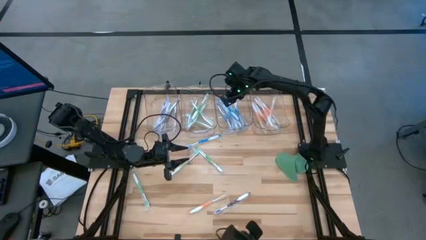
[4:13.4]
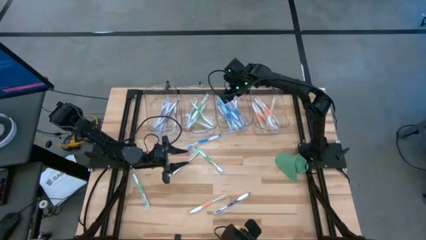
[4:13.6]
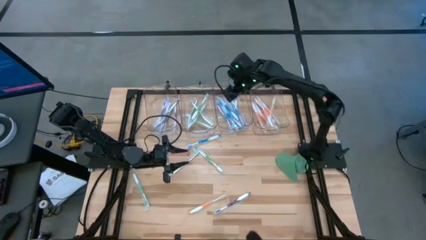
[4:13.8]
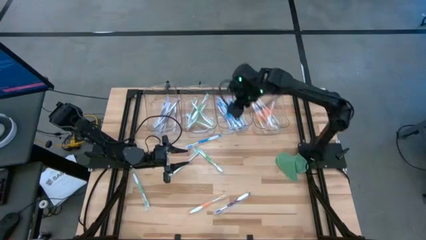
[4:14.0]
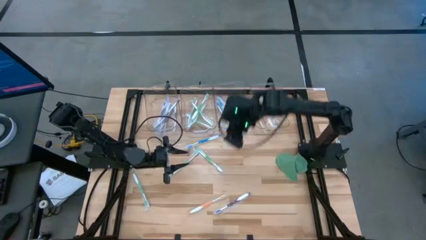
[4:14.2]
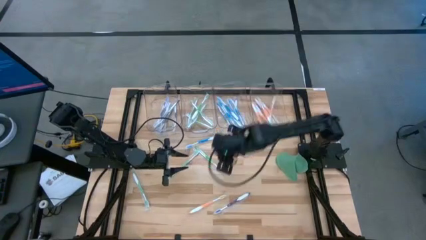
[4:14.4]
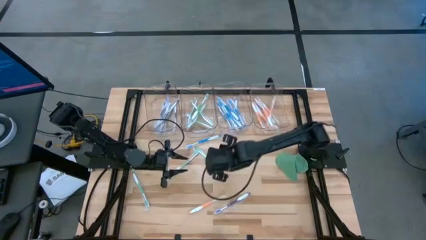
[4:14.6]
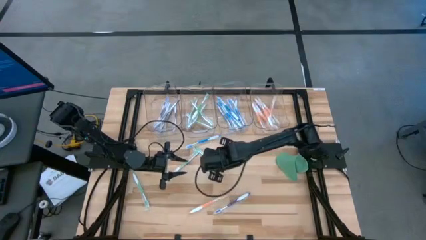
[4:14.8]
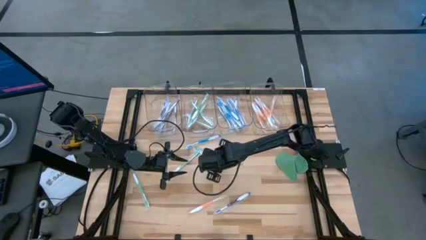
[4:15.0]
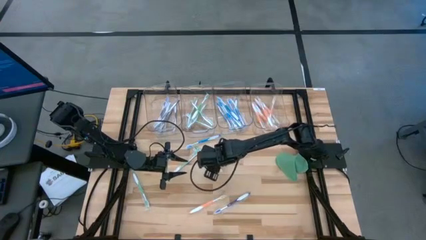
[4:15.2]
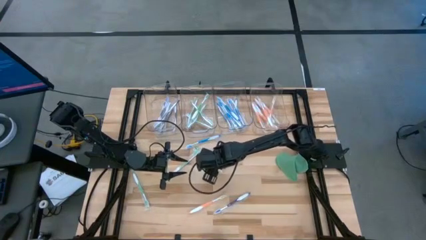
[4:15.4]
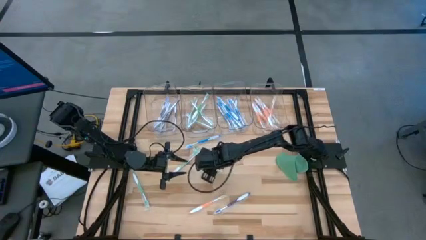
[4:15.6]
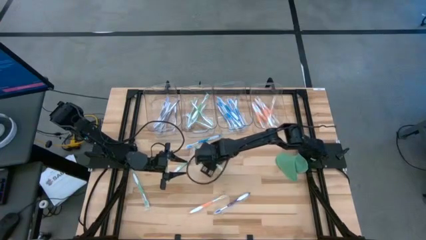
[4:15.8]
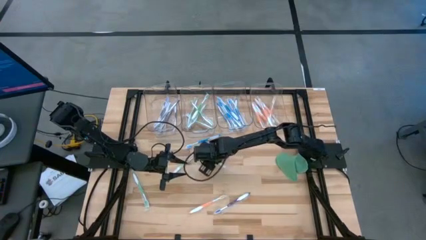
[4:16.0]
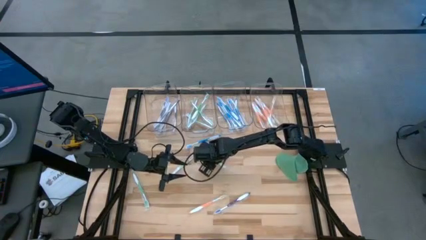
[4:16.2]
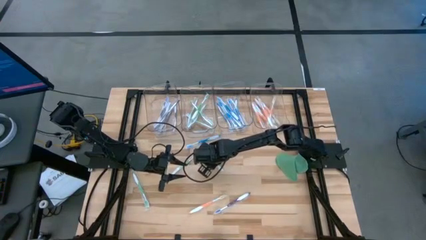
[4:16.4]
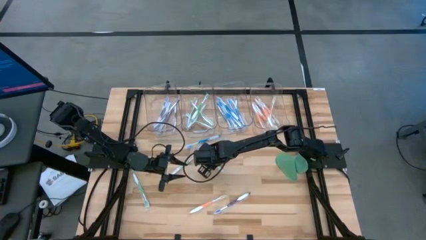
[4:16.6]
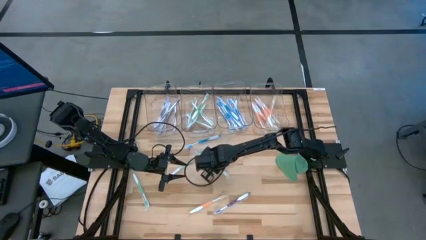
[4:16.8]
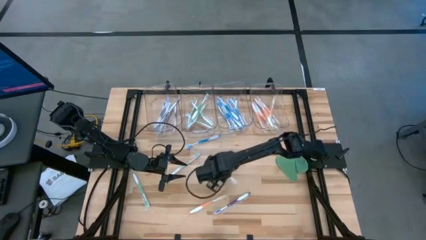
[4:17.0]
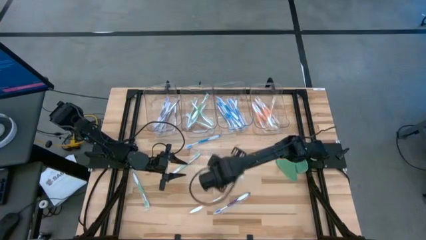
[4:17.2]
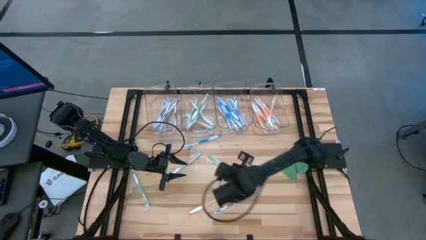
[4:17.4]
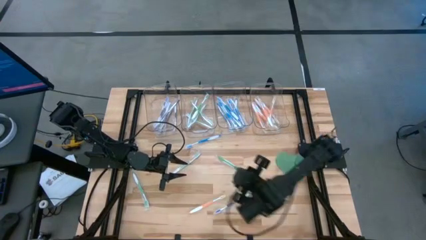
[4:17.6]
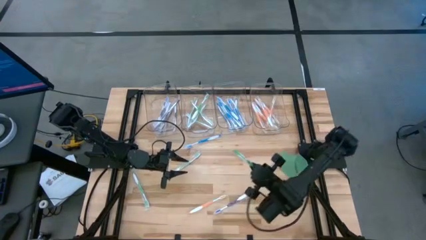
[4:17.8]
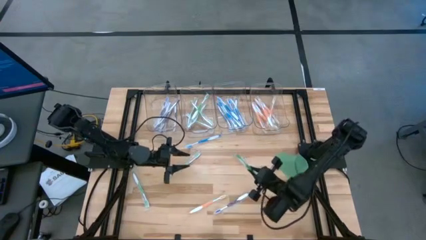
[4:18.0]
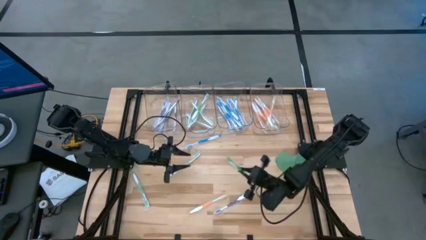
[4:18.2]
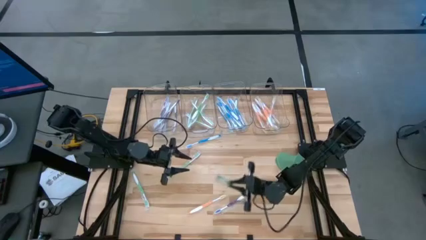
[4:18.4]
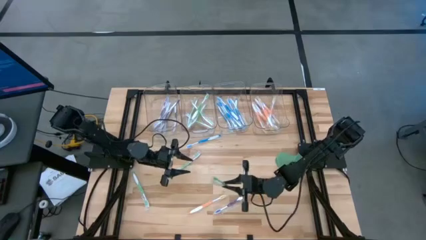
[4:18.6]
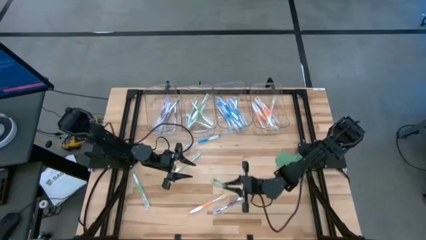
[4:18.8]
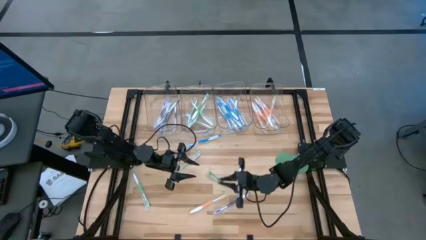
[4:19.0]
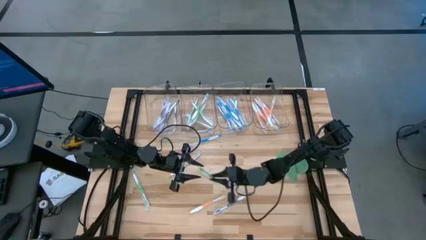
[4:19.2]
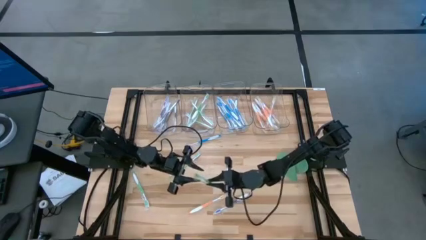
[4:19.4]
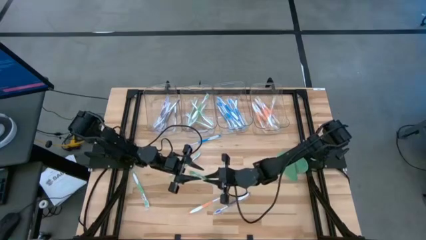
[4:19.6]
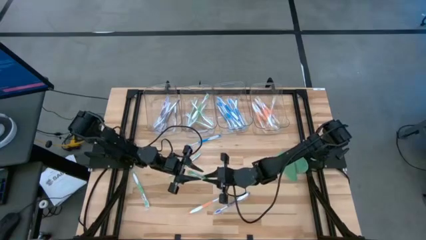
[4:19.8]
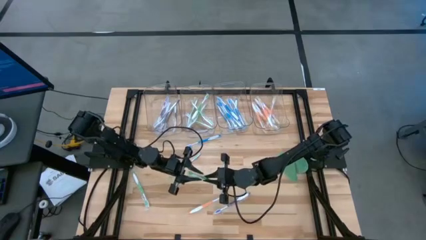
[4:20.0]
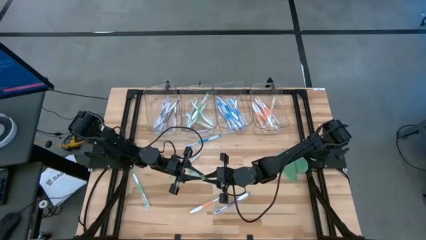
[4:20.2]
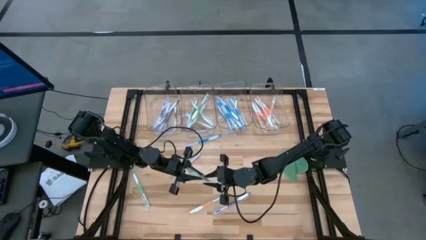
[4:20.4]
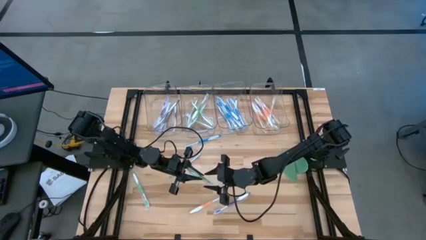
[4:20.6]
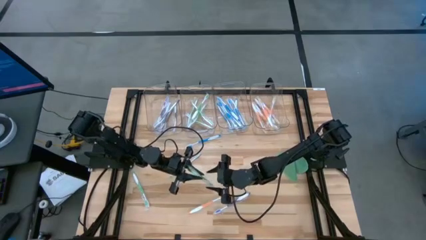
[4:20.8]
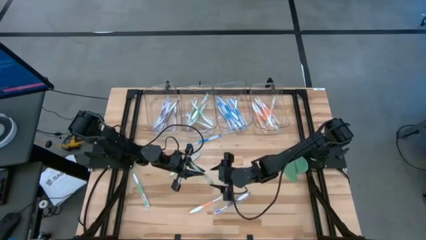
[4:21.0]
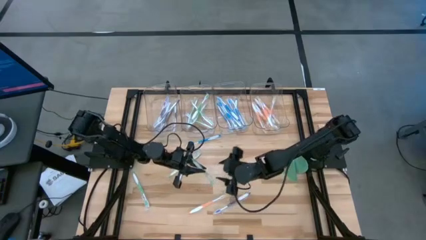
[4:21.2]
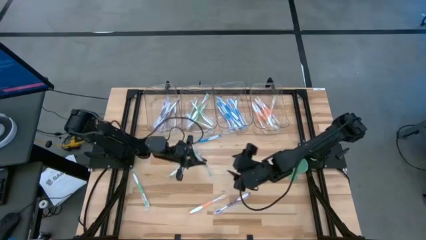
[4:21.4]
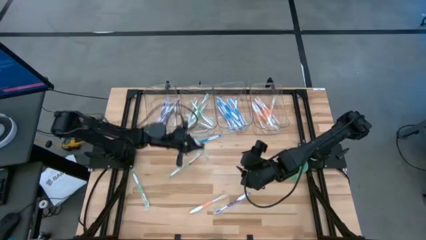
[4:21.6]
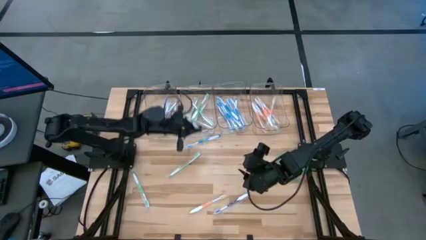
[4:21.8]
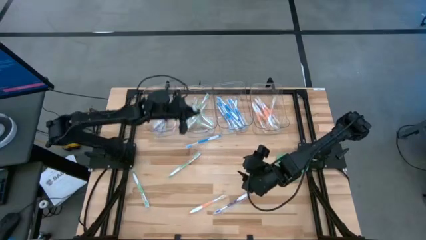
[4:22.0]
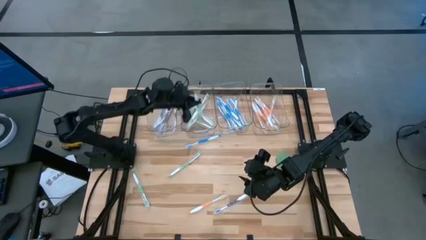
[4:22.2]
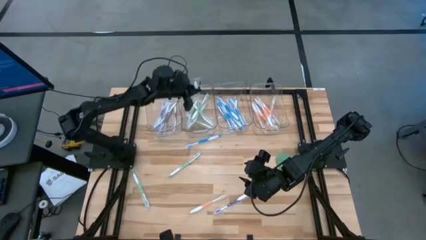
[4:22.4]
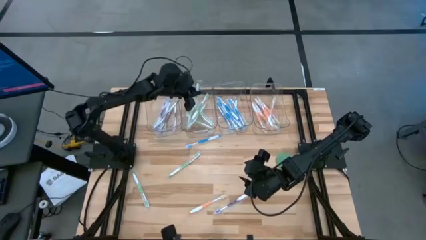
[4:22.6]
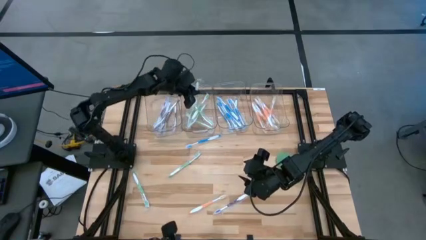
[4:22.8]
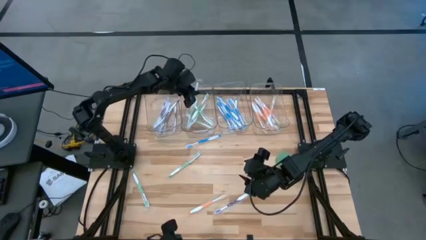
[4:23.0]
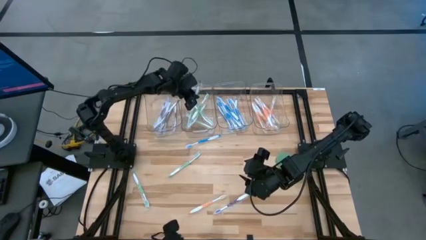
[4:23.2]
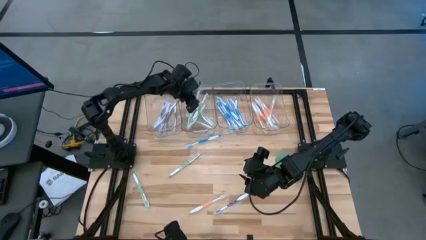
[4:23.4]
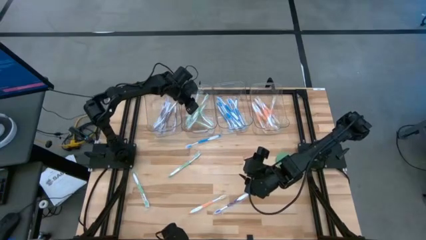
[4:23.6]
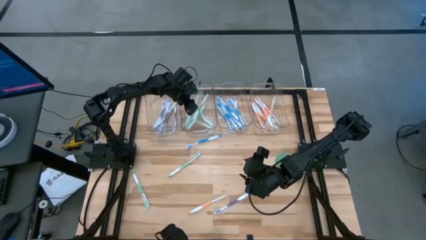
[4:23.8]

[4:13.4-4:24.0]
Task: Pick & Place Toothbrushes
Put the green toothbrush into the middle left transparent bin

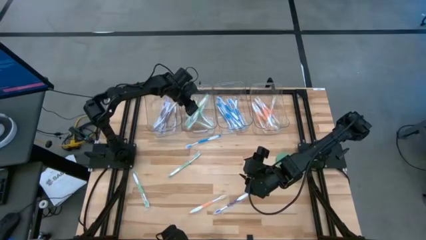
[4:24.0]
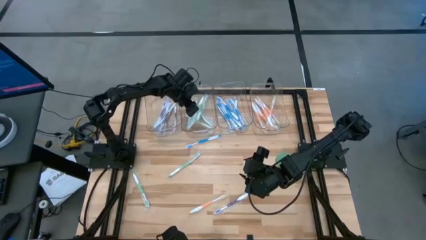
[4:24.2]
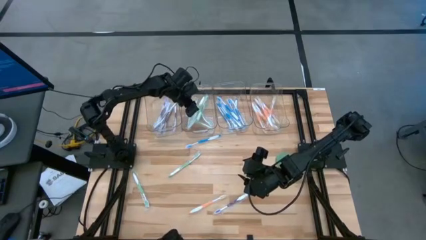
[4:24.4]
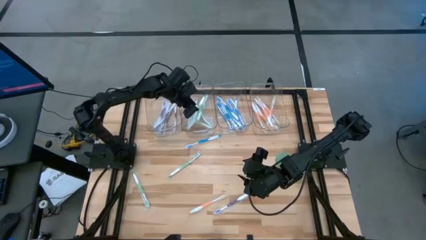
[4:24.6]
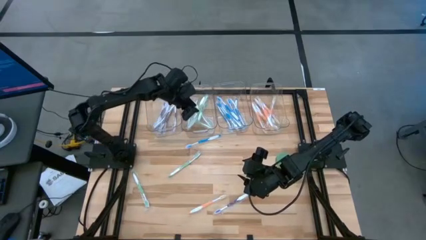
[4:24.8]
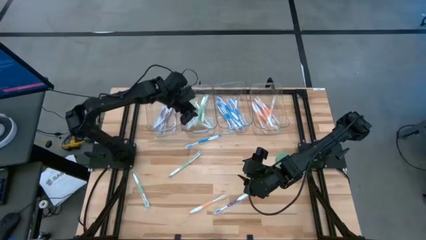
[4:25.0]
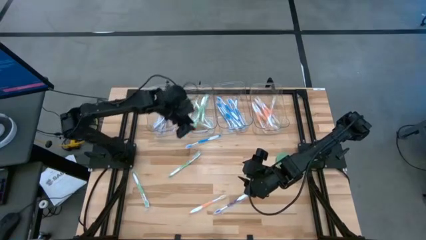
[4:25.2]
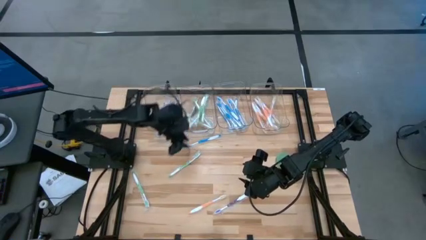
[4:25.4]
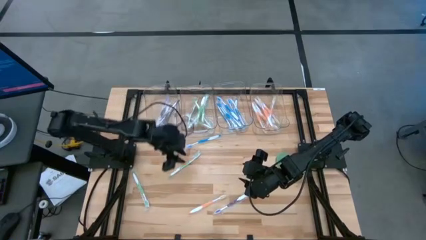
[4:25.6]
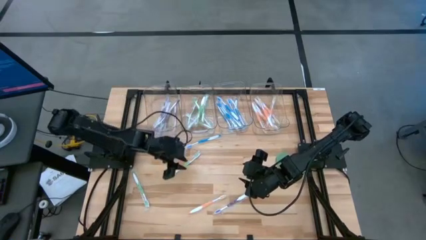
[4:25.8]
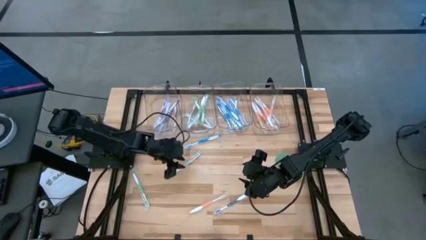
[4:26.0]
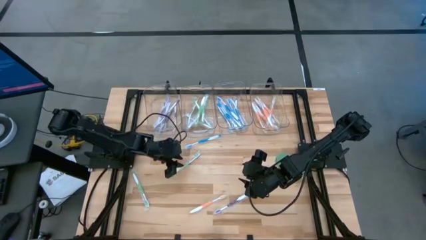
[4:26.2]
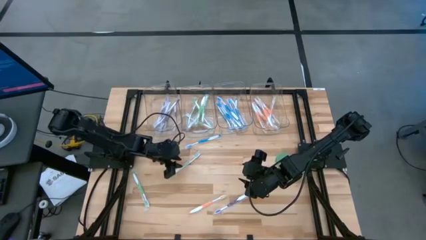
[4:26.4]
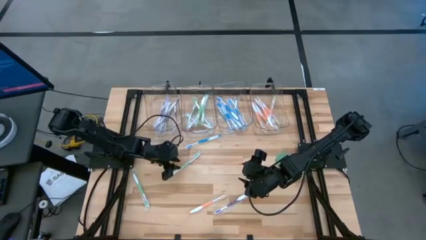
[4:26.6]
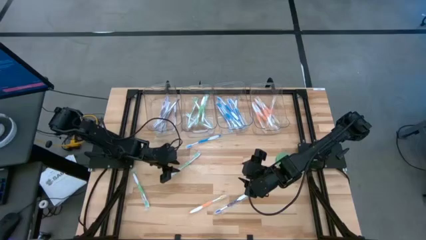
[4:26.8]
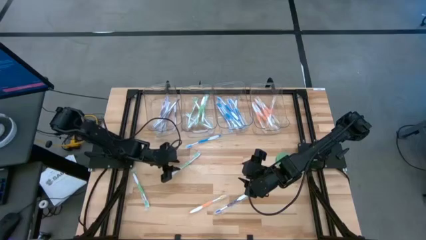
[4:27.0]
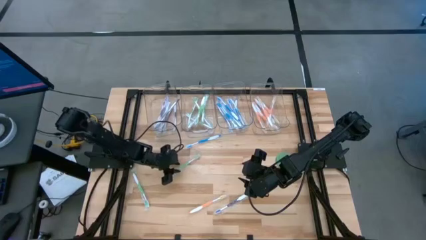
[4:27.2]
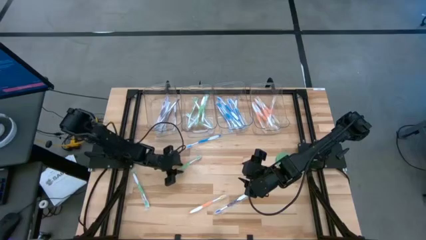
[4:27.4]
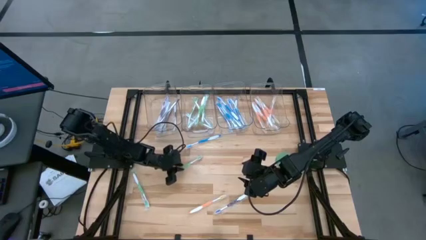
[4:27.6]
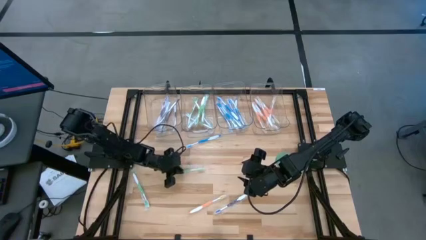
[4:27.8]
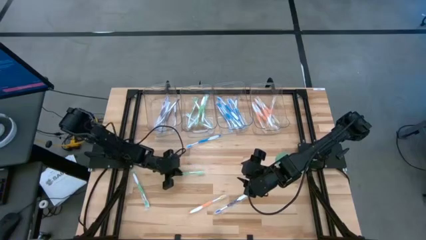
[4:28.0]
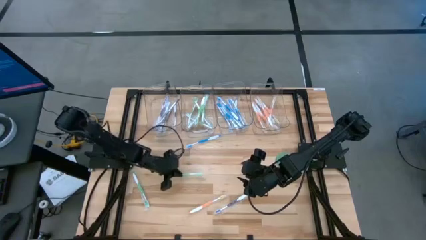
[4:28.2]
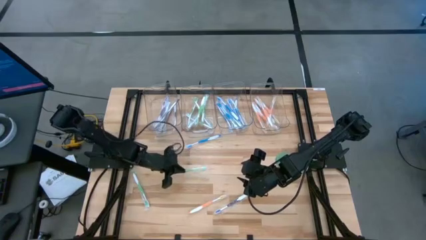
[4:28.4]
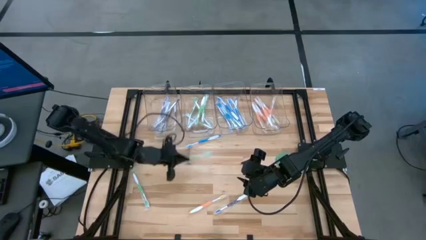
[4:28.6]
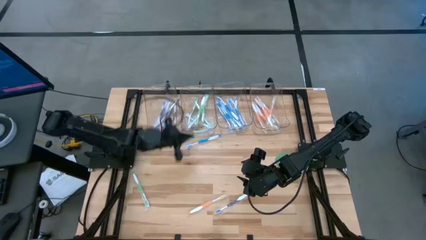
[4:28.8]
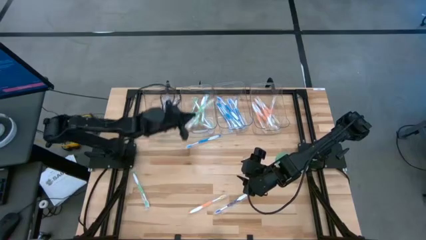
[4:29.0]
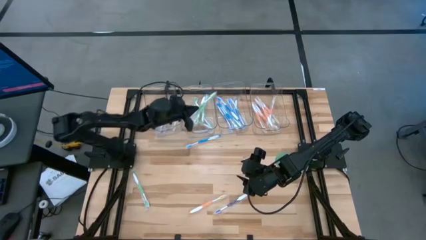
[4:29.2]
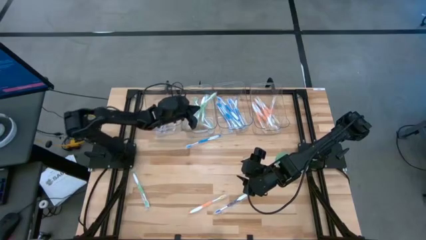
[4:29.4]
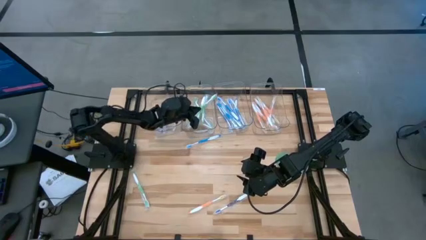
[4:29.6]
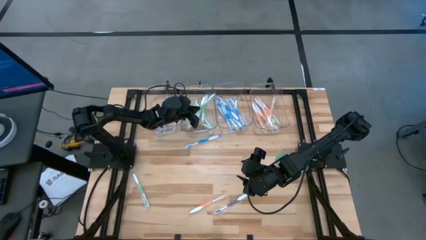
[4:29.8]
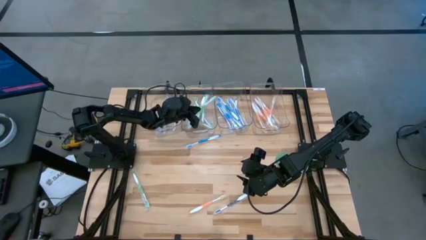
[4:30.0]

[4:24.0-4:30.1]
Put the green toothbrush into the middle left transparent bin
